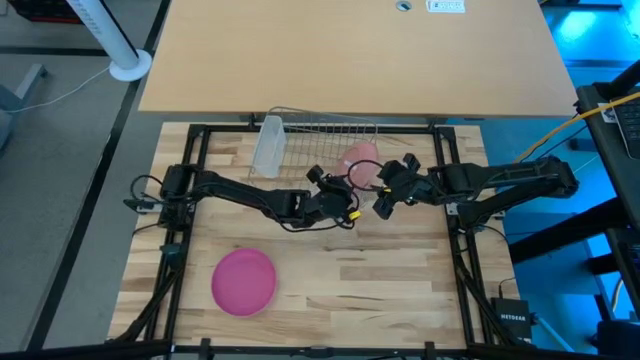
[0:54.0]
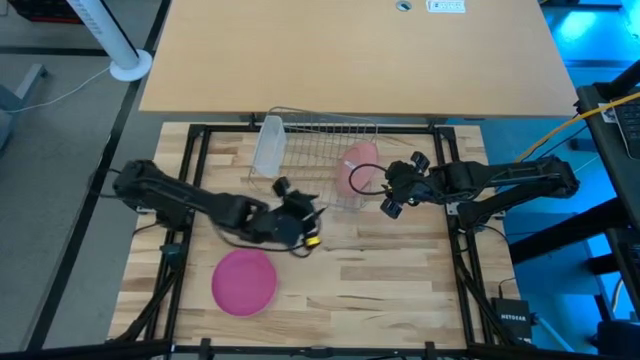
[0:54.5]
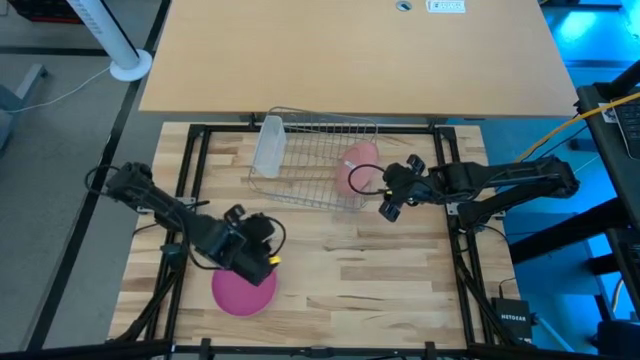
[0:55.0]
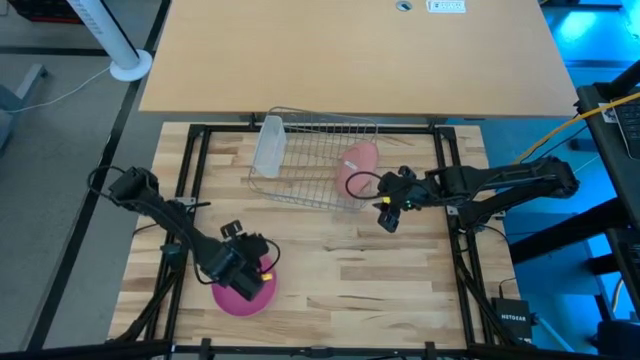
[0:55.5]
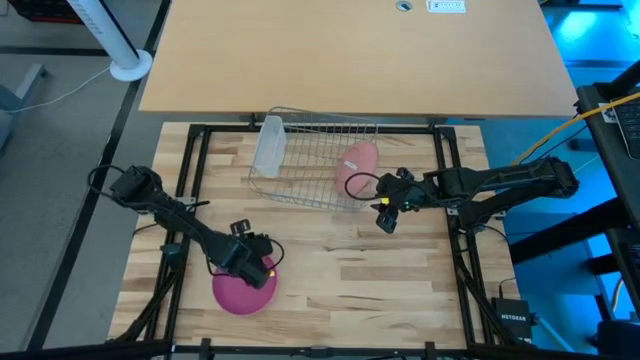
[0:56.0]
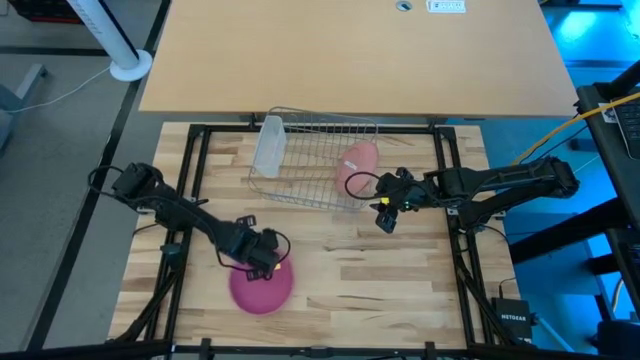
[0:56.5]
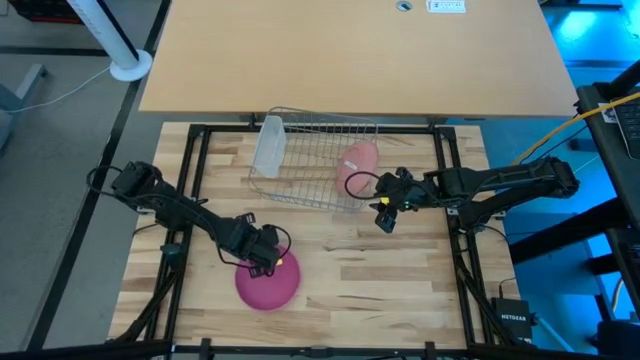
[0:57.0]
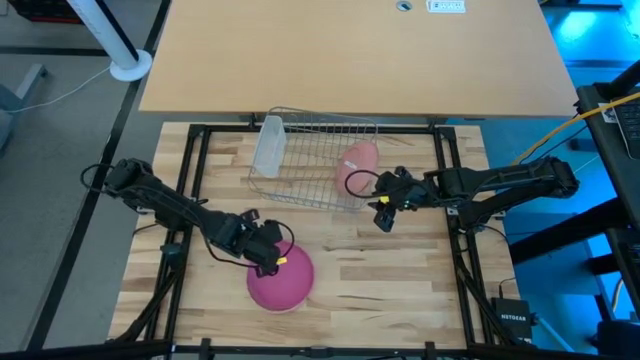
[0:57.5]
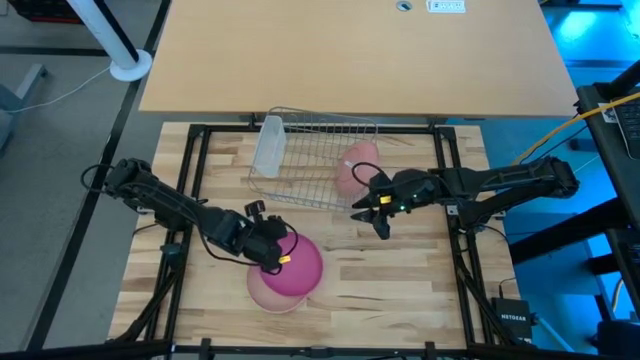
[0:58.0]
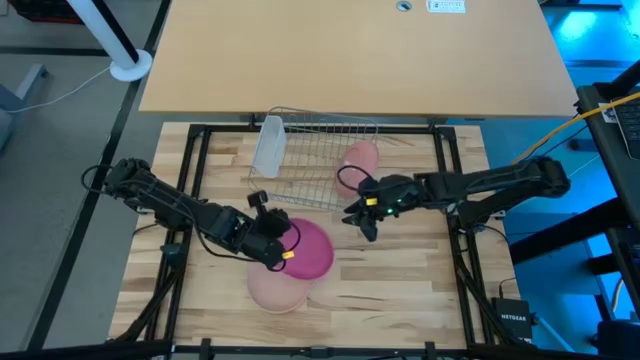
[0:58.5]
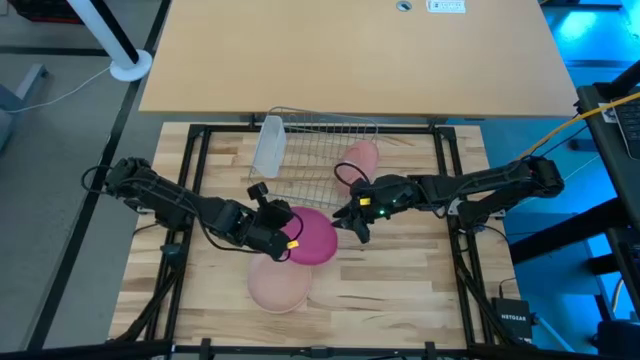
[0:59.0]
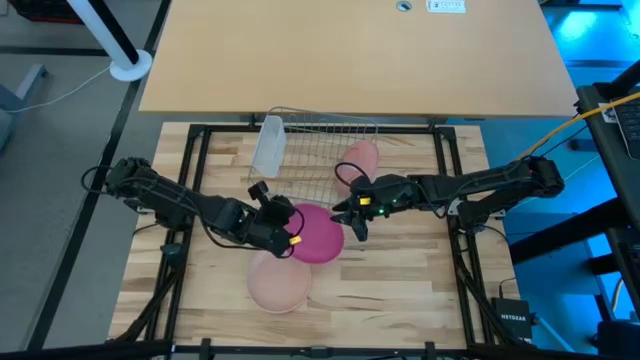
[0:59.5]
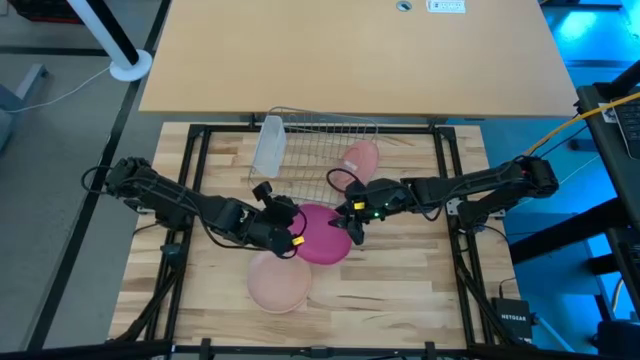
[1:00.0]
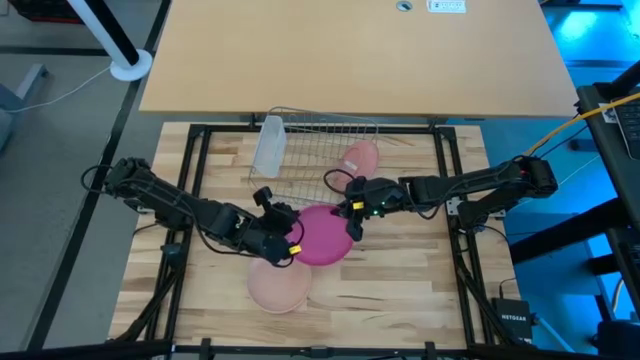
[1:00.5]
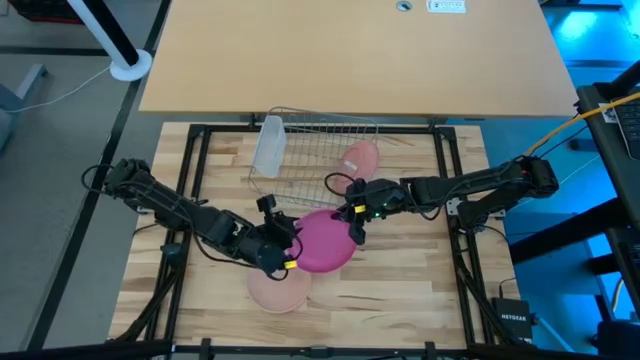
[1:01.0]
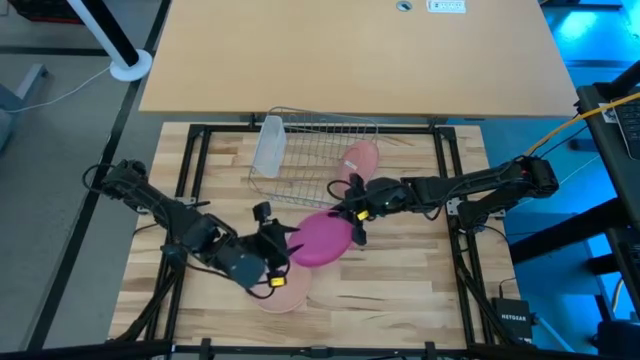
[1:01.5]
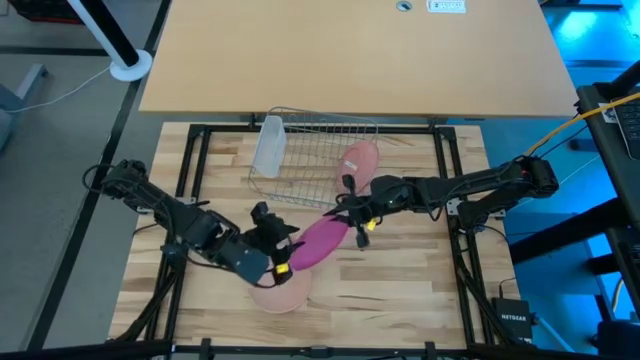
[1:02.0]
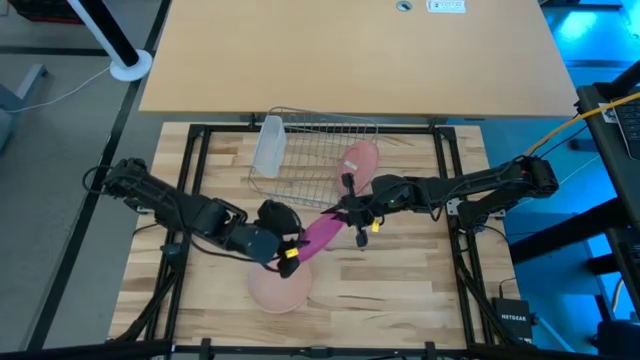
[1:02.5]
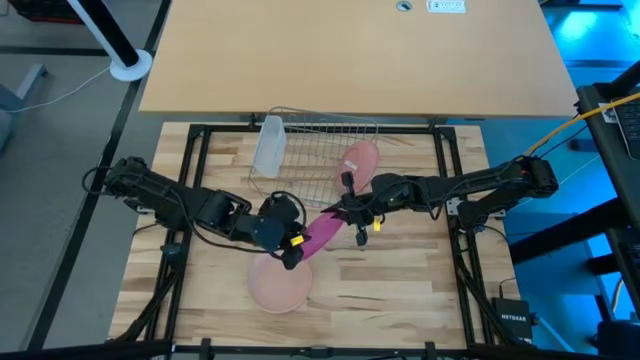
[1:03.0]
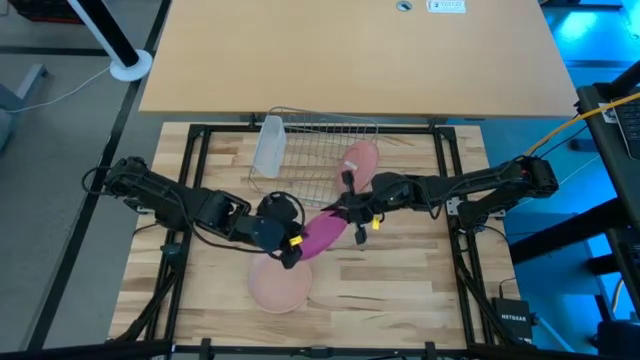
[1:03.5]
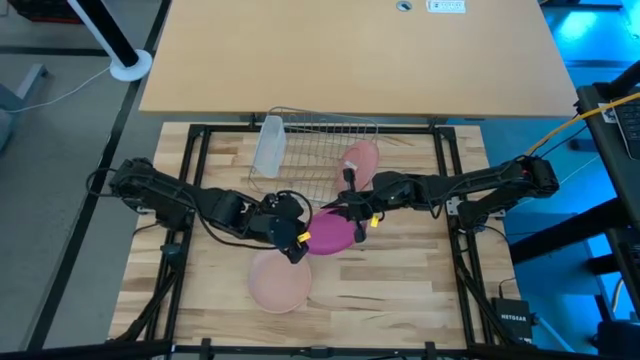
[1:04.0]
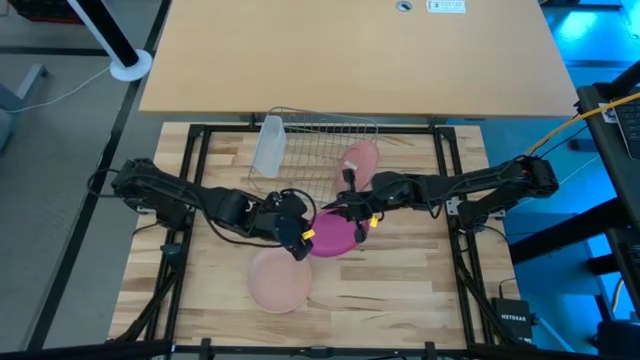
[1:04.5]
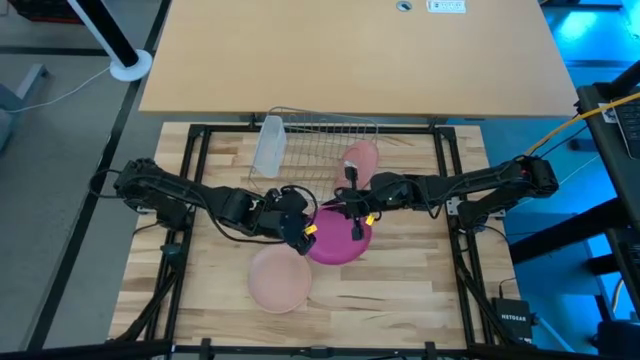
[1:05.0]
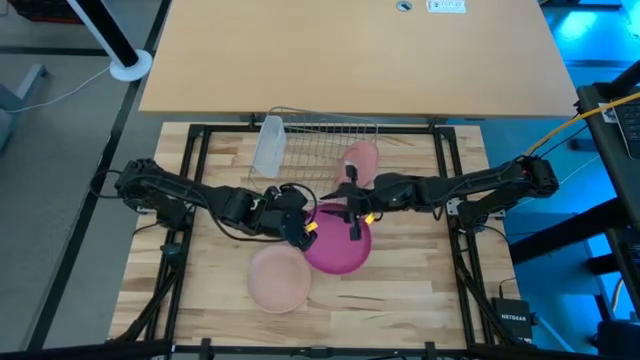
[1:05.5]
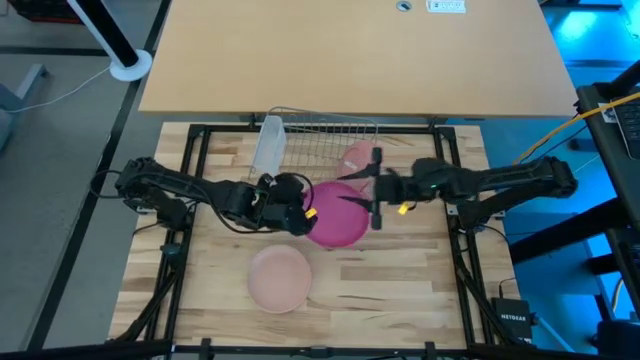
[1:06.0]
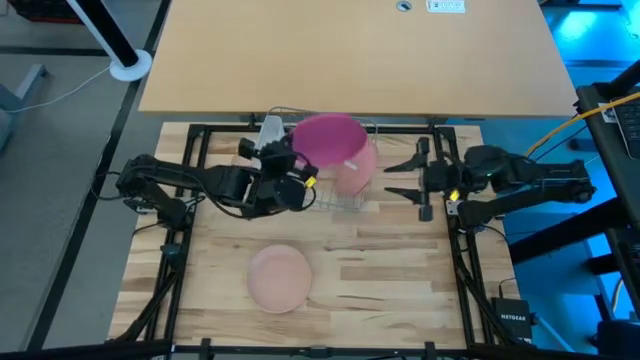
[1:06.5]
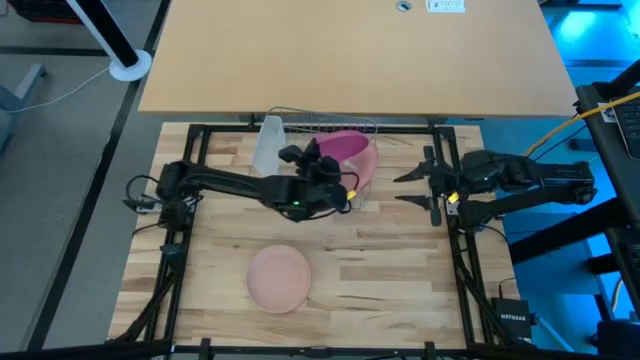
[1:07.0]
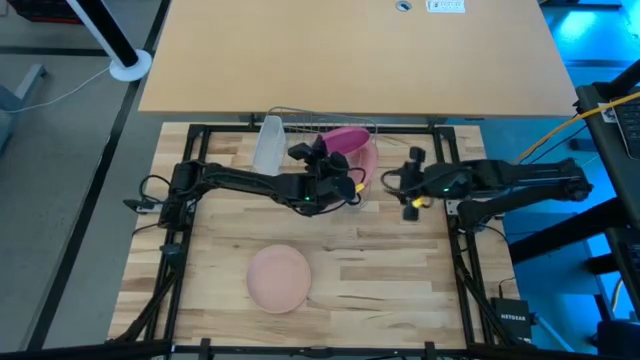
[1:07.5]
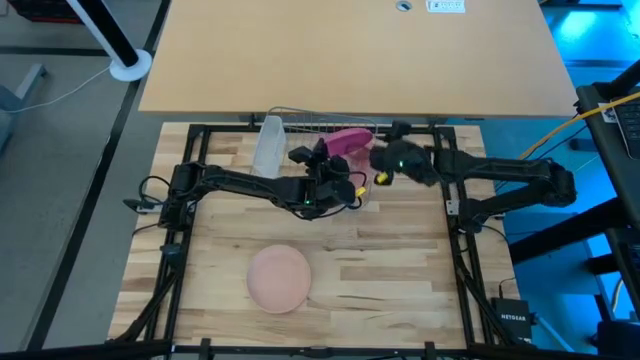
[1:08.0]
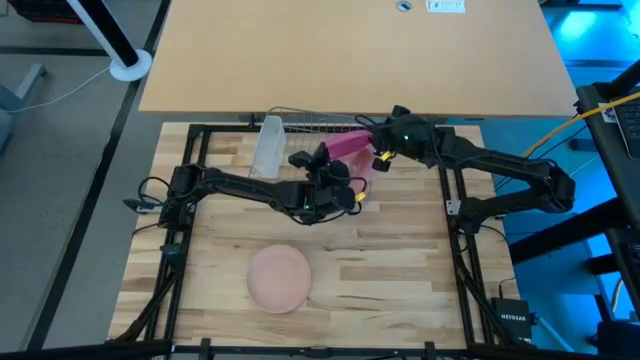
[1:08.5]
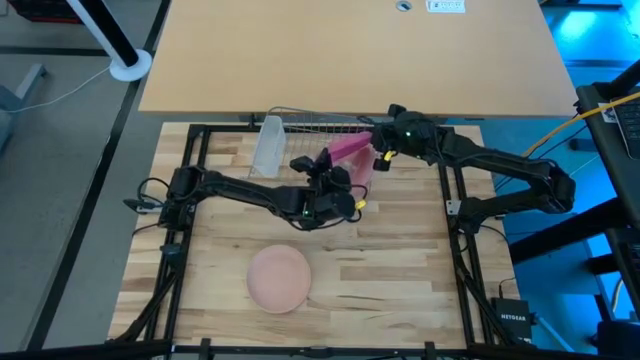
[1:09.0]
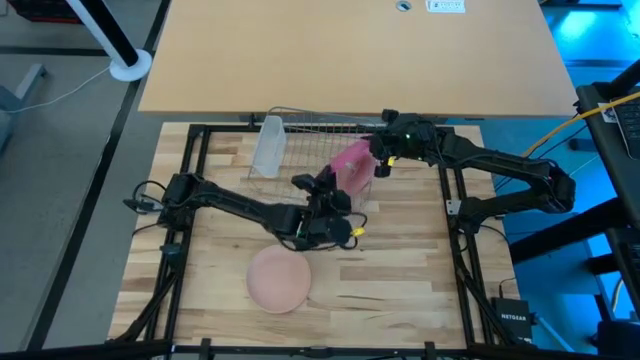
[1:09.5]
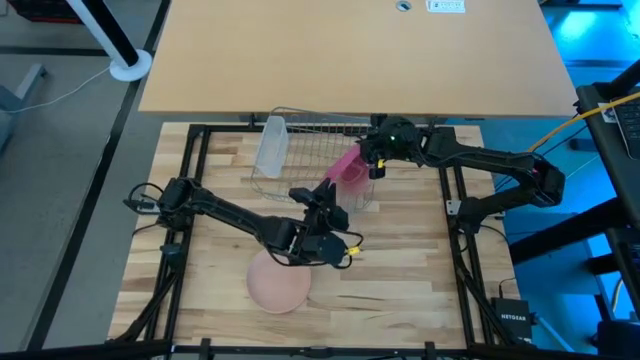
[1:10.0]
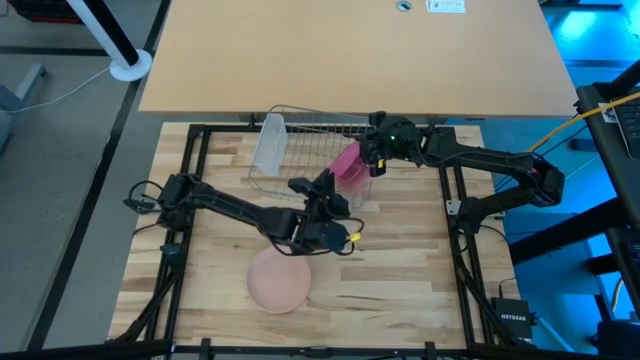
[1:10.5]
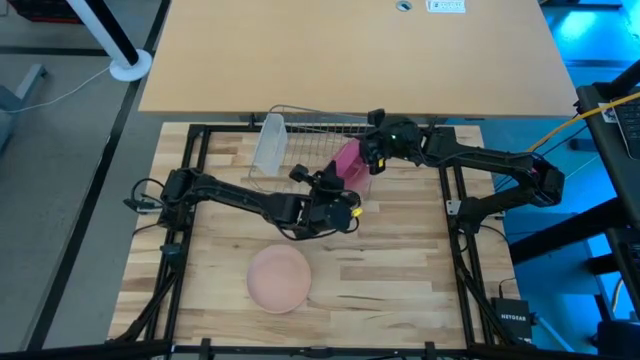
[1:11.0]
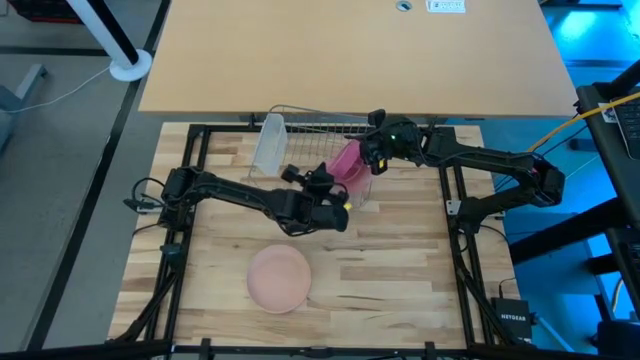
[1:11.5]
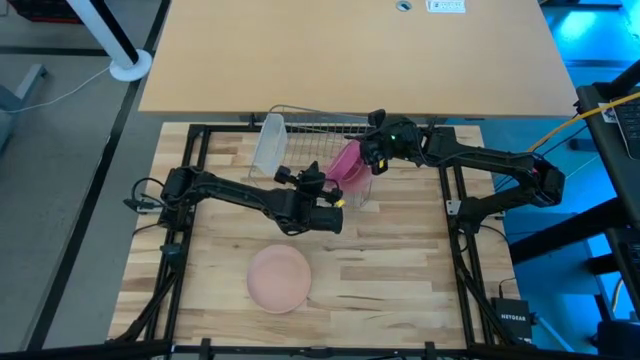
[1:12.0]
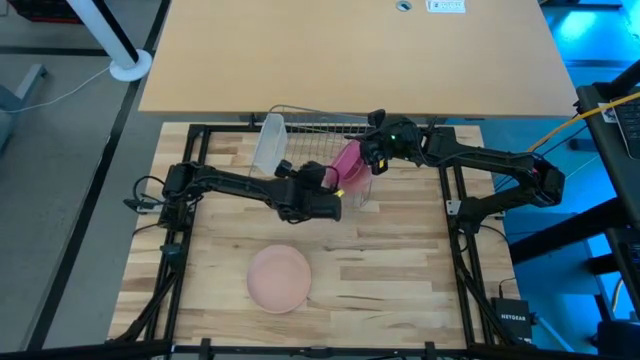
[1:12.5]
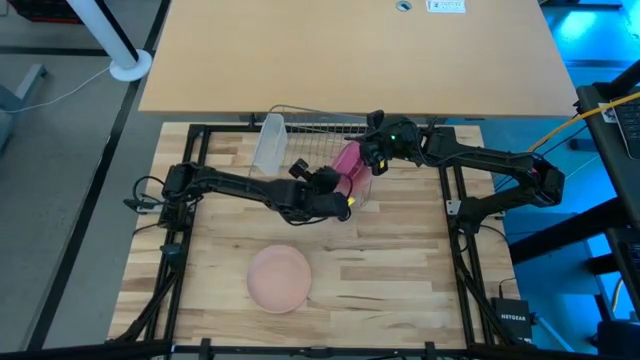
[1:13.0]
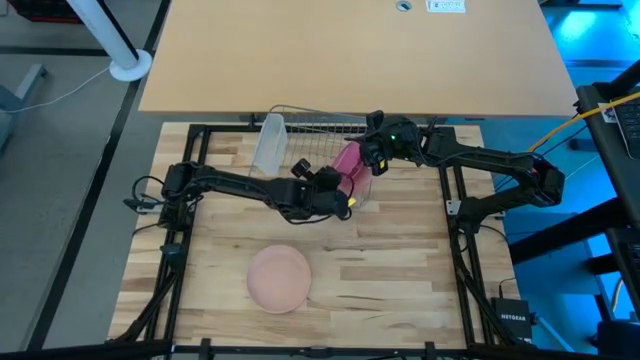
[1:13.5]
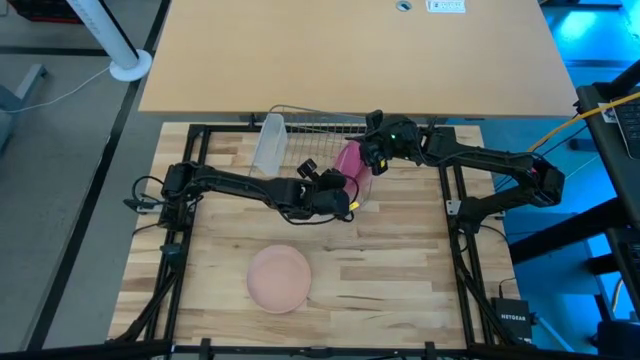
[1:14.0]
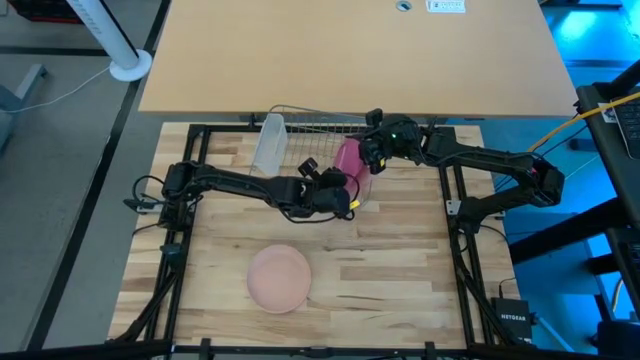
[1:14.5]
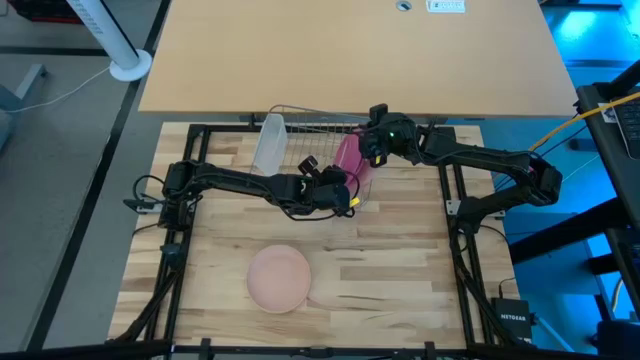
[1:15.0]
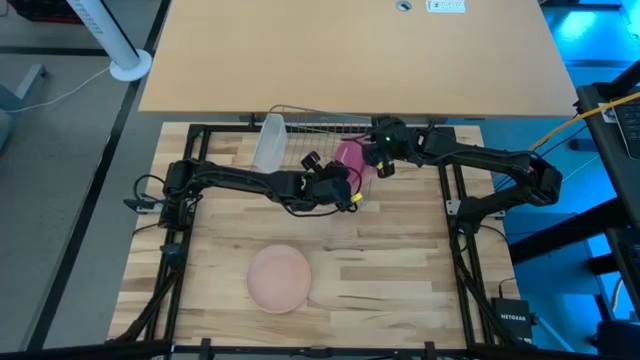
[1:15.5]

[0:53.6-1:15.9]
Task: Sort dishes
Put the pink plate into the dish rack
